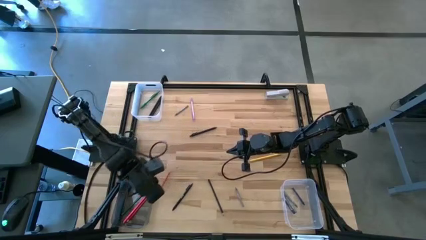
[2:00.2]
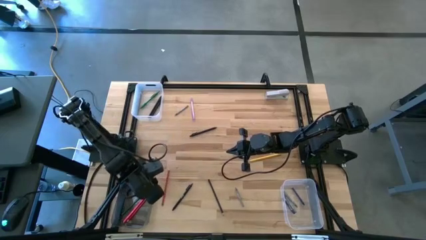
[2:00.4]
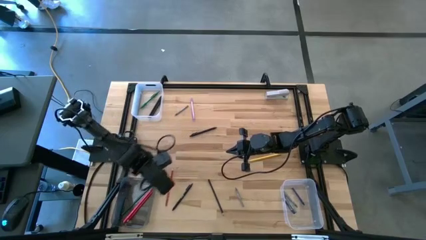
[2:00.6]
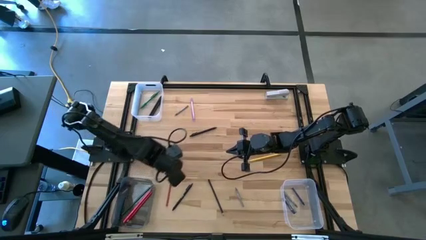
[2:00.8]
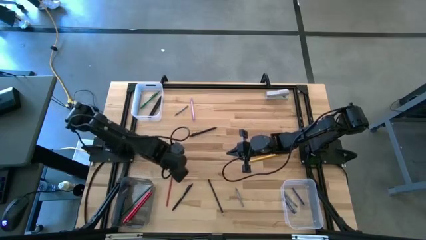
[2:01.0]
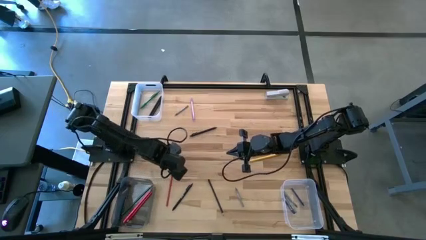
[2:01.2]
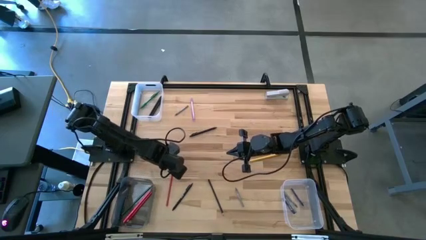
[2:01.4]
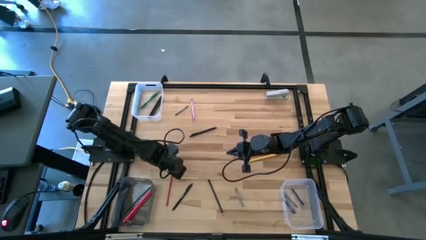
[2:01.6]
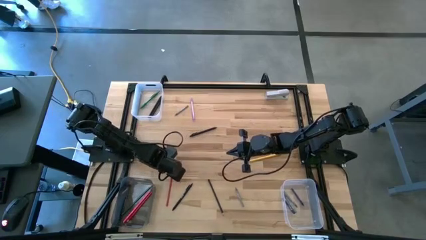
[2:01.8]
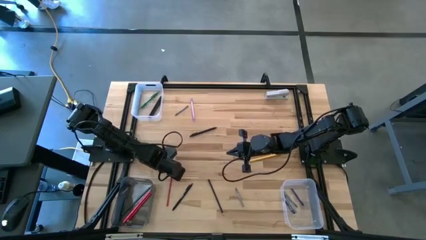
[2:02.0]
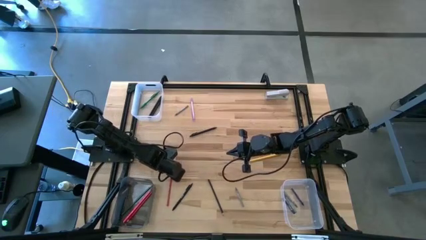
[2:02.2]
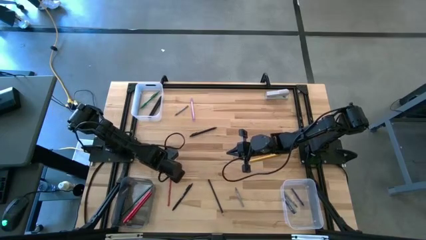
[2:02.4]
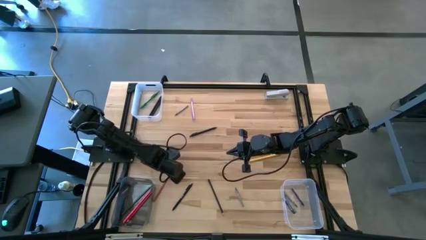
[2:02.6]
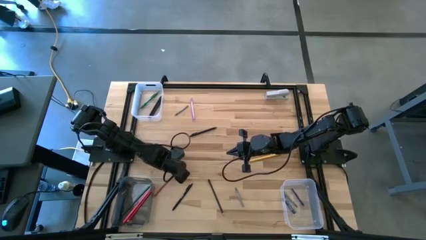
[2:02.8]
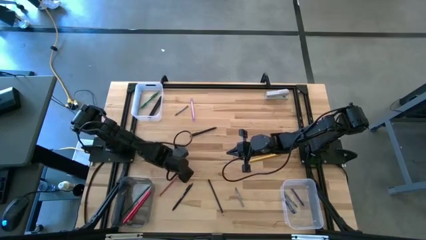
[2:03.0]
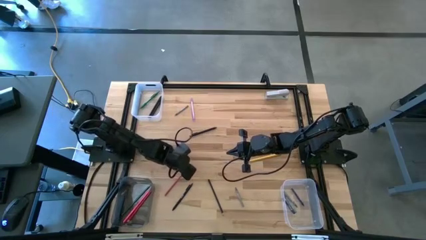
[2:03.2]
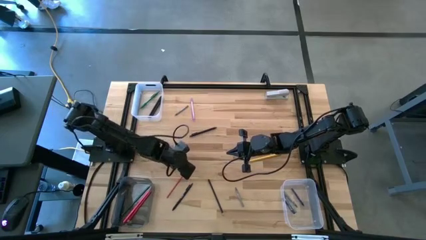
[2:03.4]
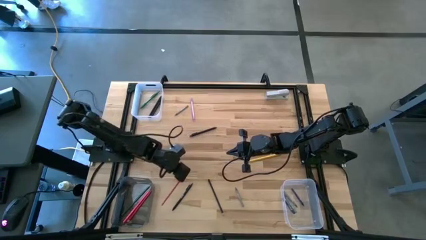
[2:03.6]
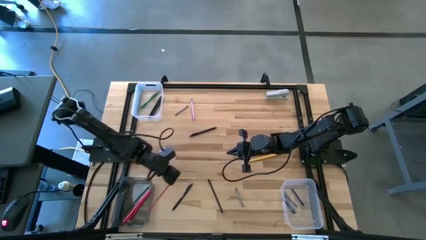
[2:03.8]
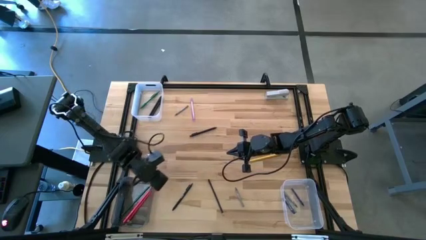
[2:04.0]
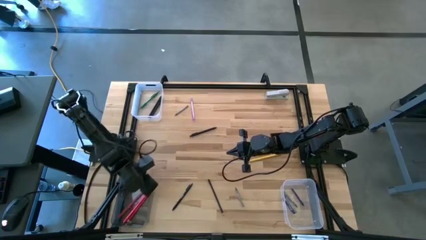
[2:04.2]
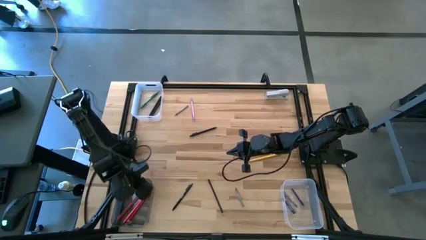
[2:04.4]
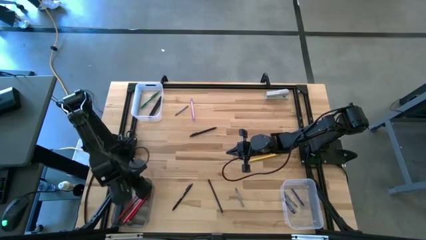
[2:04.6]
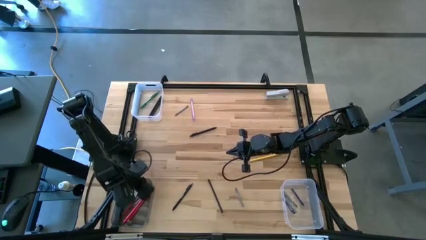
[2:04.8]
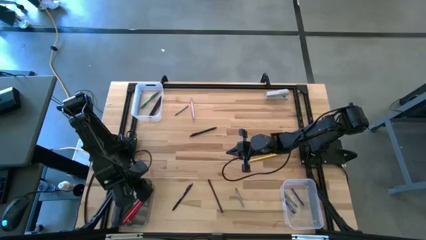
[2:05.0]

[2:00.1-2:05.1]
Task: Sort crayons/erasers/pens/pencils in bins
Put the red pencil into the black bin

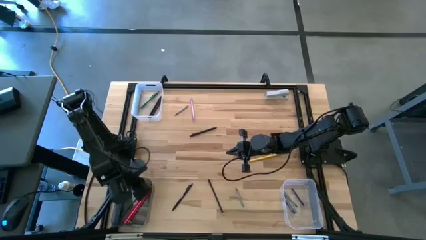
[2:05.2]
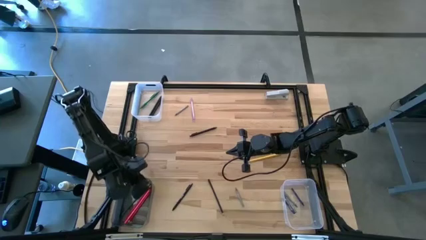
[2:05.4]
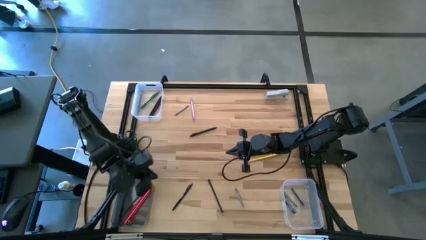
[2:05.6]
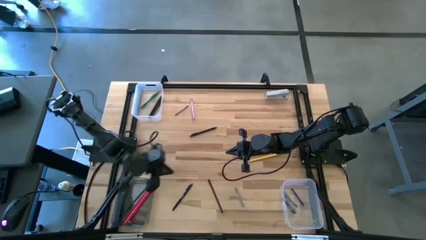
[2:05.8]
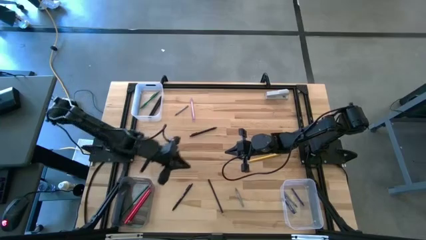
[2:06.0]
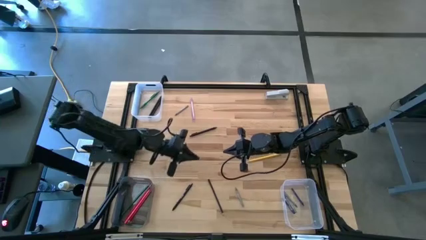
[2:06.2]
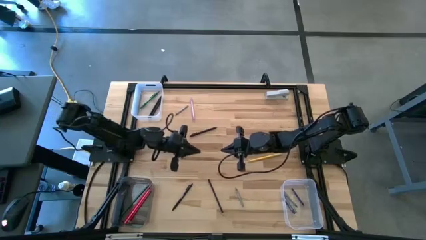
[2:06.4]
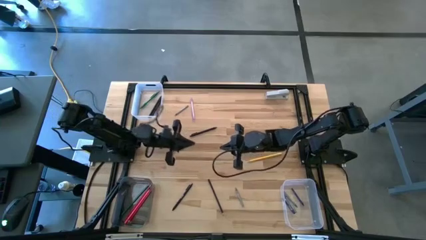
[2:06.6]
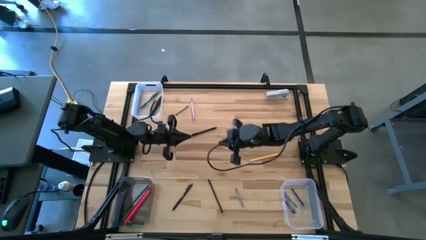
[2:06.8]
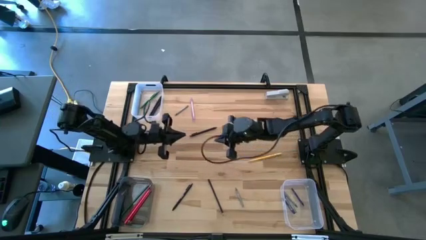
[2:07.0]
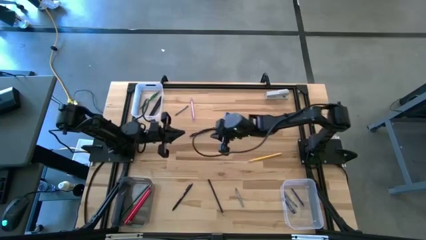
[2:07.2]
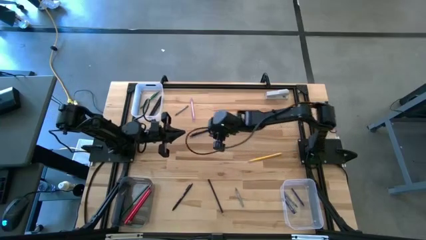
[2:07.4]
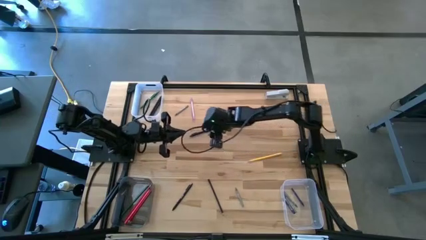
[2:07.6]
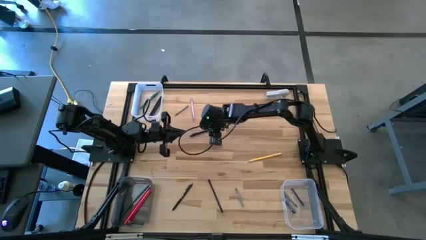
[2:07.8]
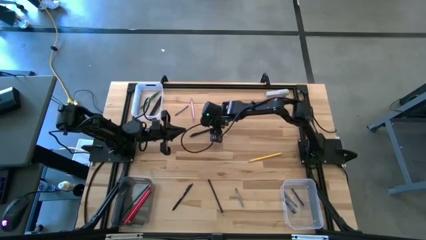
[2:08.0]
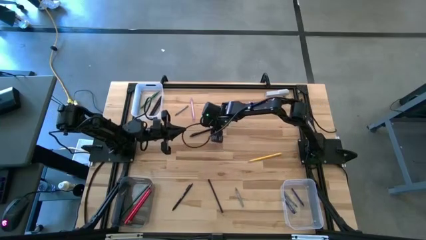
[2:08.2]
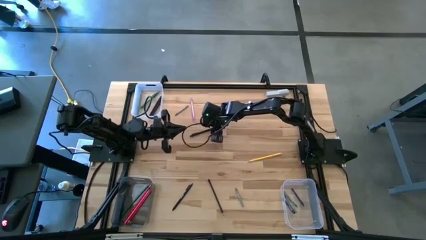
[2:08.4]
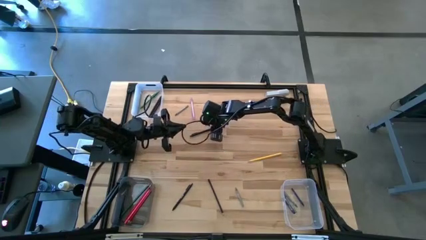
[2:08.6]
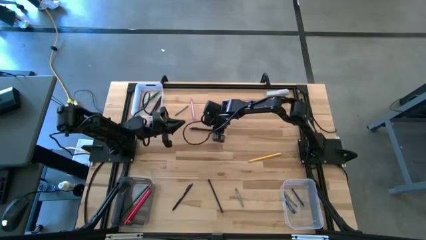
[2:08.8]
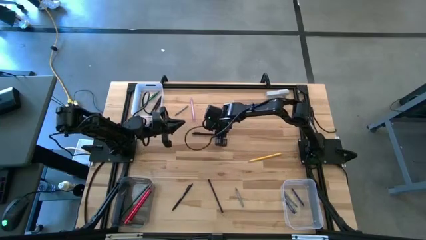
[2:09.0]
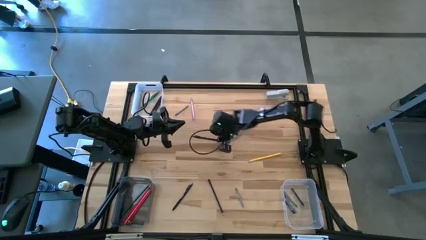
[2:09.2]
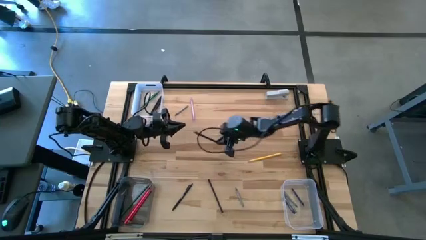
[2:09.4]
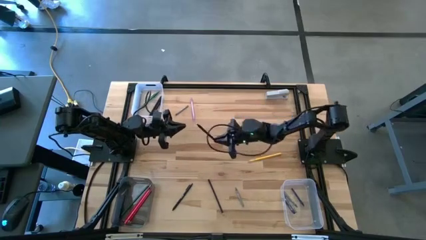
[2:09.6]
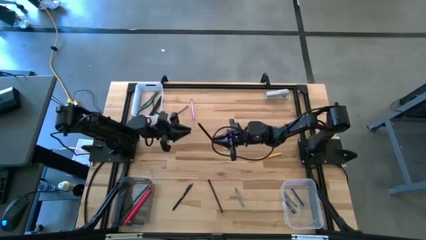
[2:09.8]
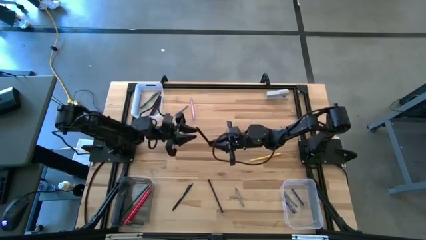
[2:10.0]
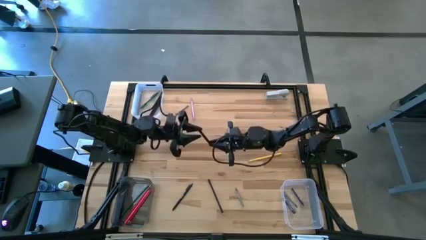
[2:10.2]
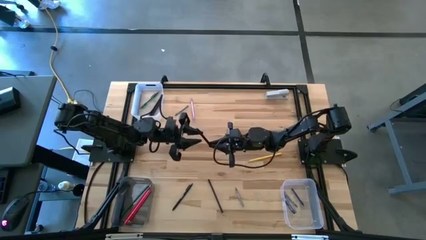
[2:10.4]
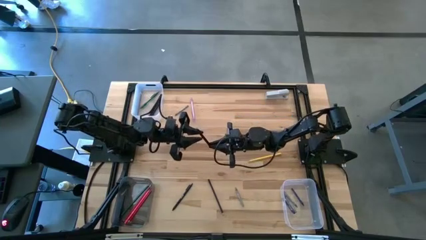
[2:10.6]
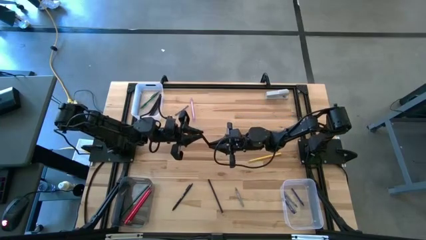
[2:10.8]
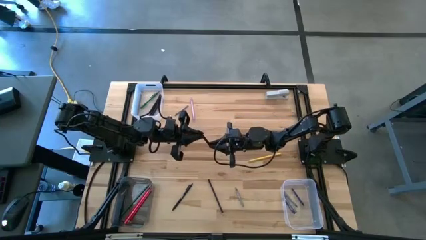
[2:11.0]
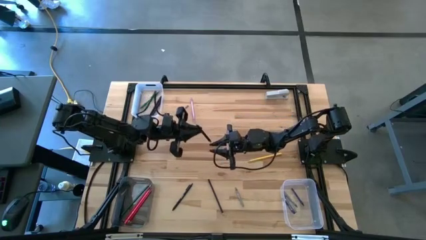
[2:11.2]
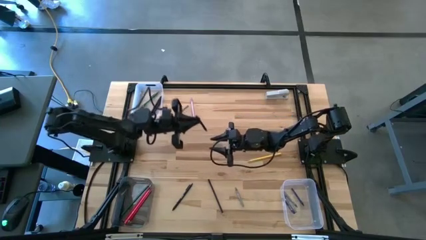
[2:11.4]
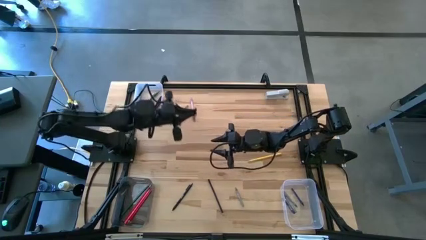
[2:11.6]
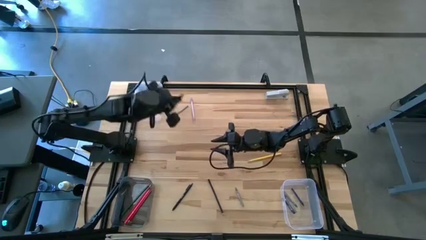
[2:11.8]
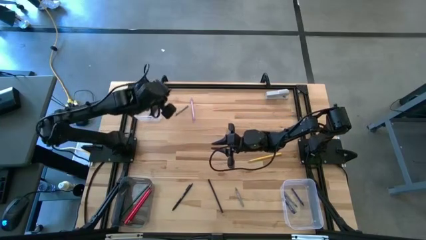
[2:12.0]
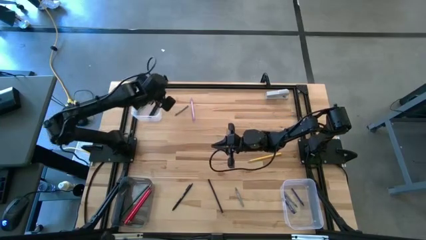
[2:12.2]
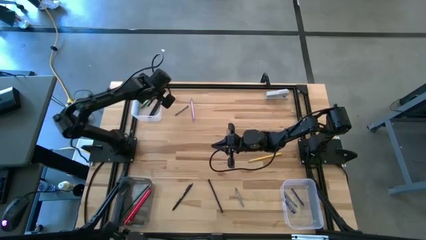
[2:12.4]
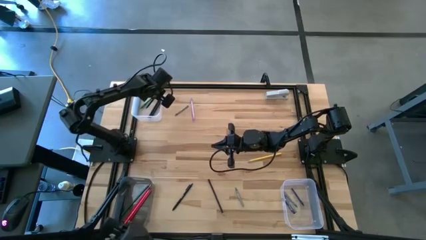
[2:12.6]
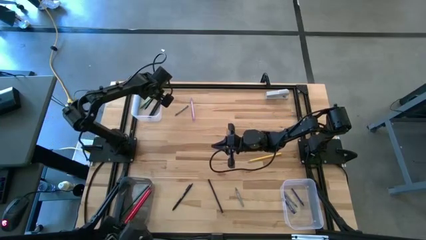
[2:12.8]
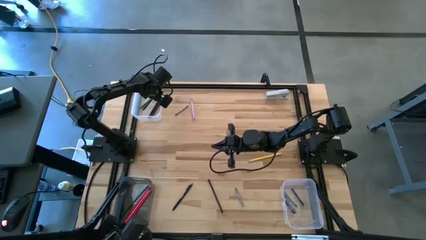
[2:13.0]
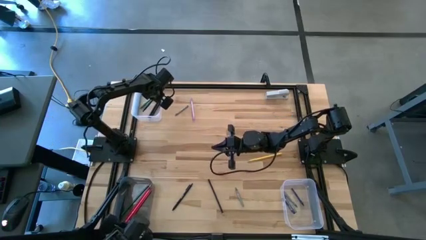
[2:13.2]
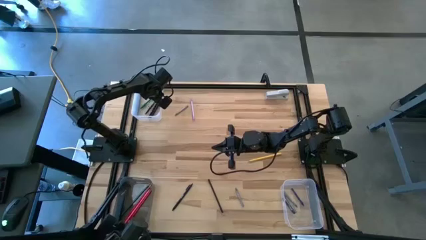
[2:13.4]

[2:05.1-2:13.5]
Put the top black pen into the top transparent bin

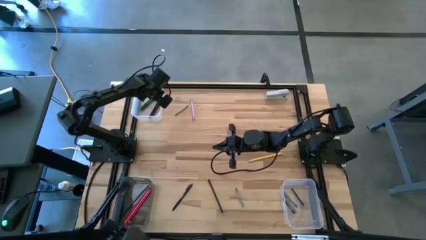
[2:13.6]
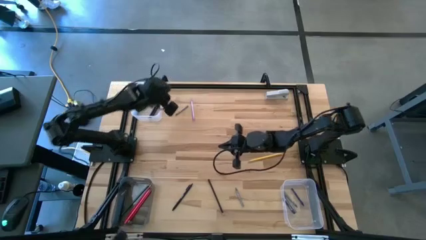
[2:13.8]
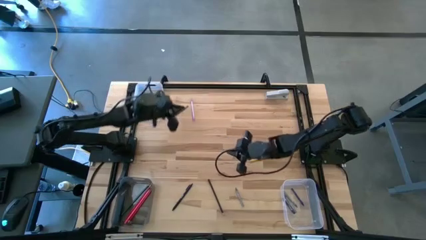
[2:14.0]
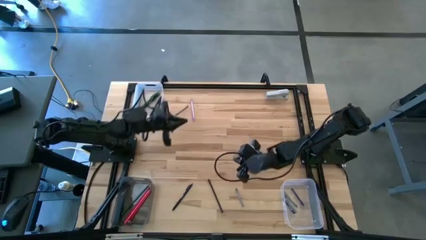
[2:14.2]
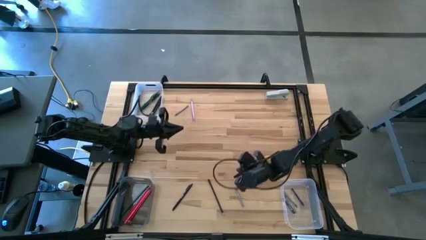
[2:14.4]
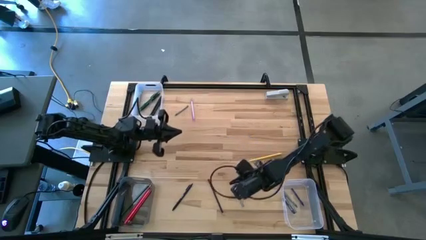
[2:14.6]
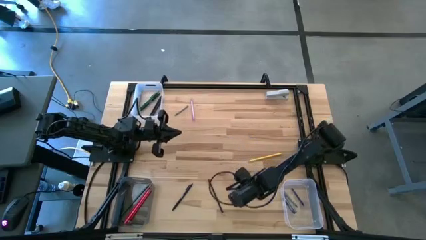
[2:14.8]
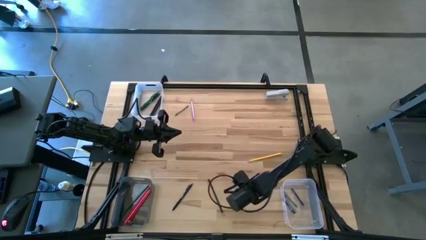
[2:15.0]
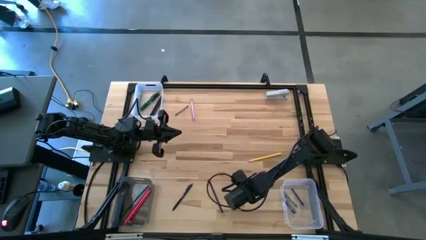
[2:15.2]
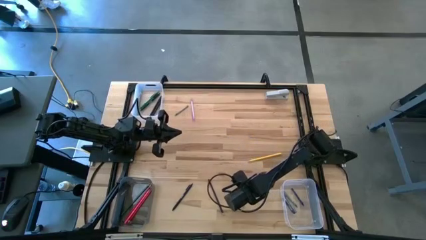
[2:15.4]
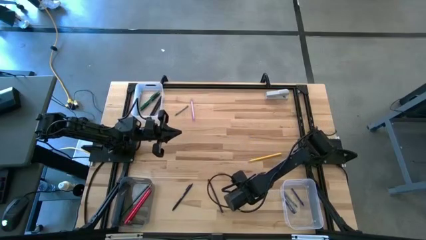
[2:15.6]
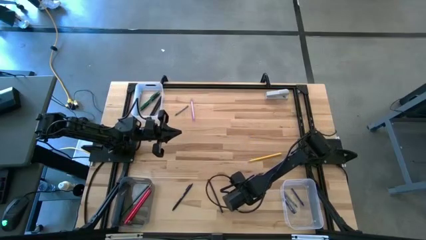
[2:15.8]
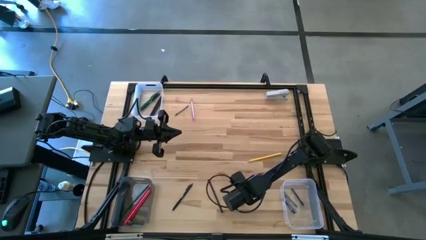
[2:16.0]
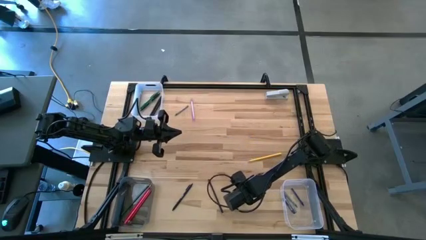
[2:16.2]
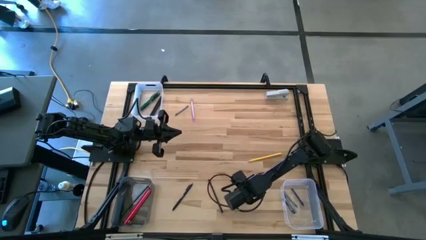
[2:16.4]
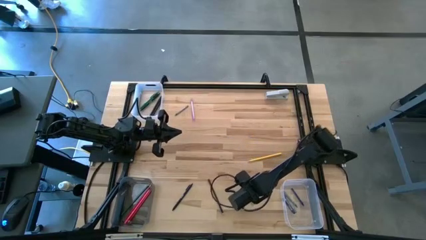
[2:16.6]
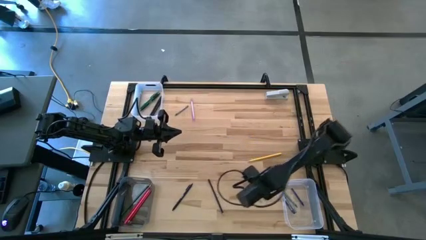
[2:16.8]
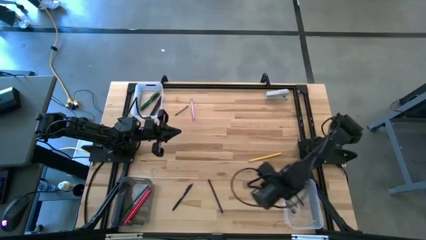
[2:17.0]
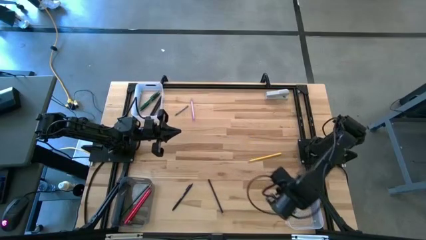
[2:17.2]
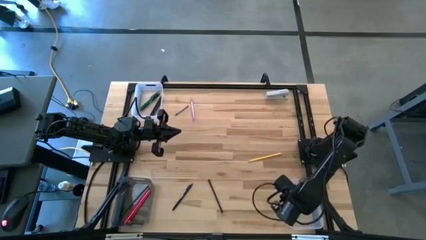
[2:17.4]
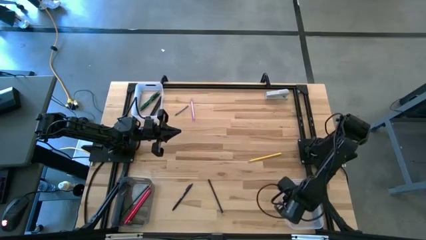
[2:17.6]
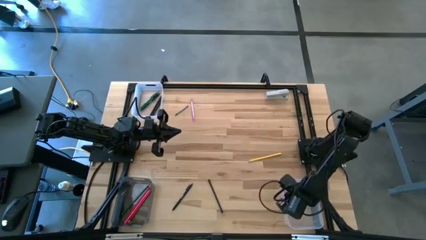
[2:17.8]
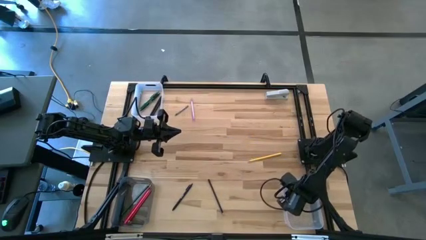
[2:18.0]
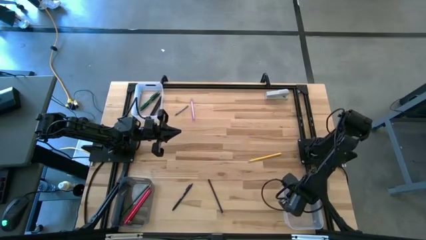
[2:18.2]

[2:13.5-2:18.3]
Put the bottom gray crayon into the bottom transparent bin
